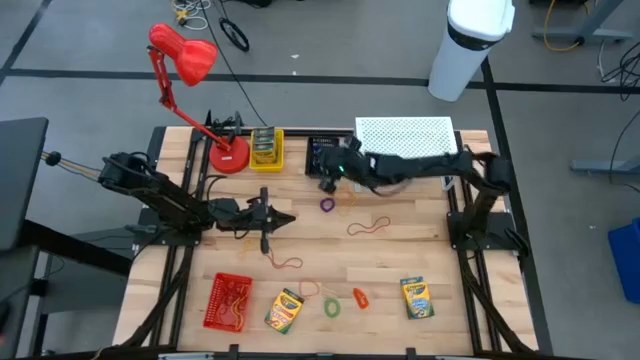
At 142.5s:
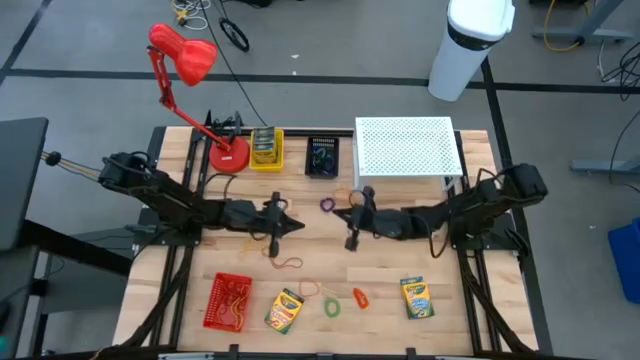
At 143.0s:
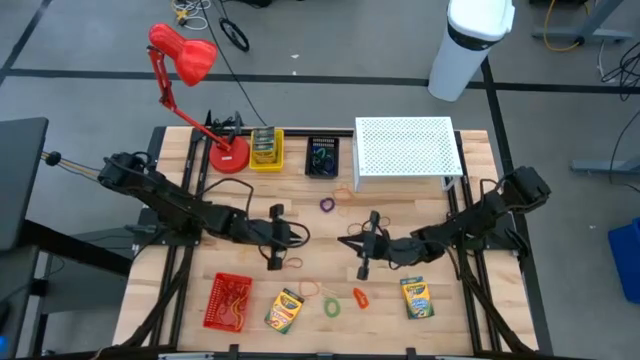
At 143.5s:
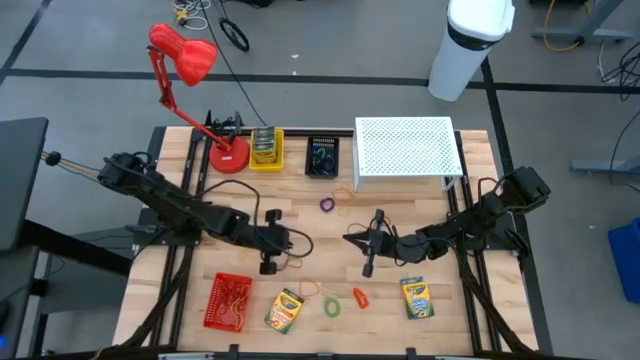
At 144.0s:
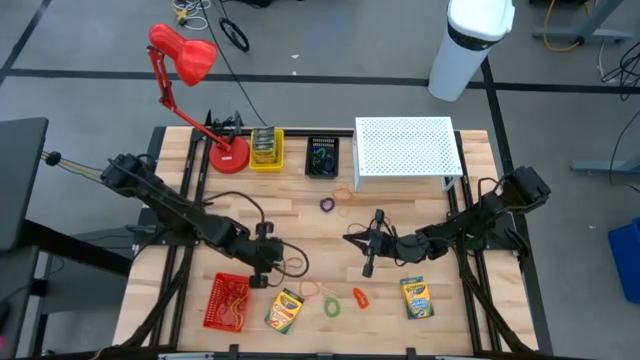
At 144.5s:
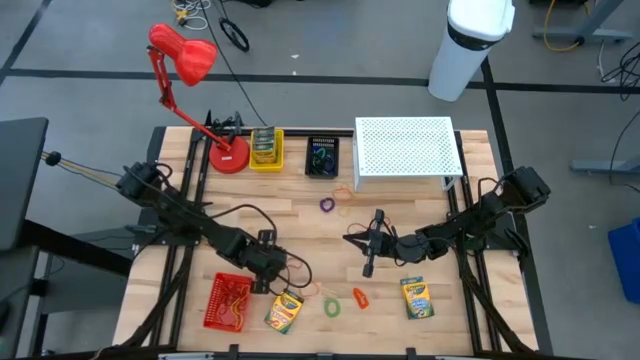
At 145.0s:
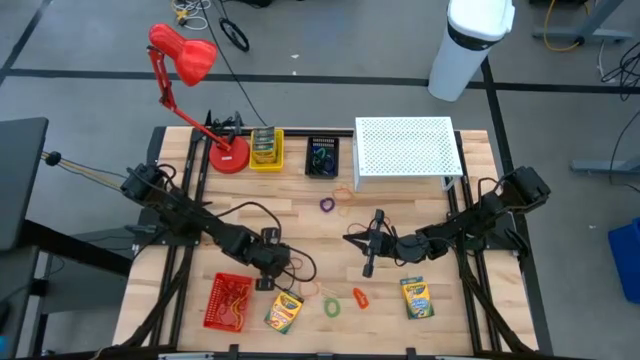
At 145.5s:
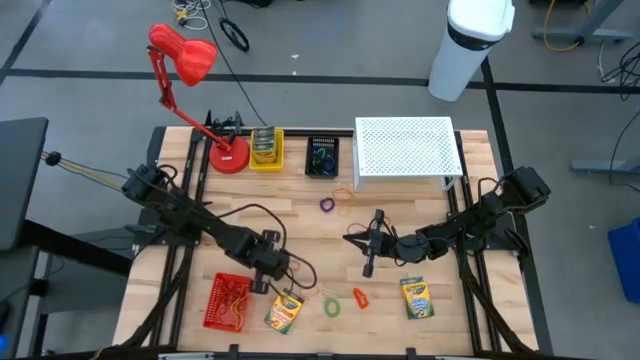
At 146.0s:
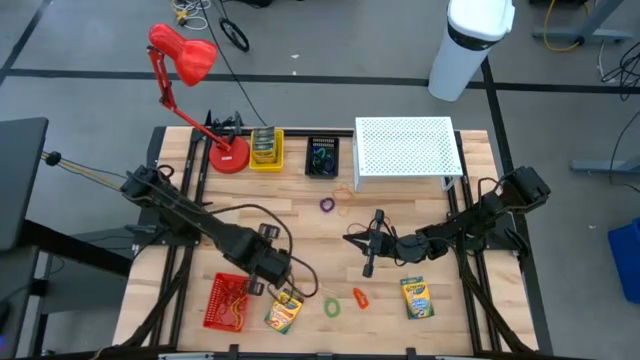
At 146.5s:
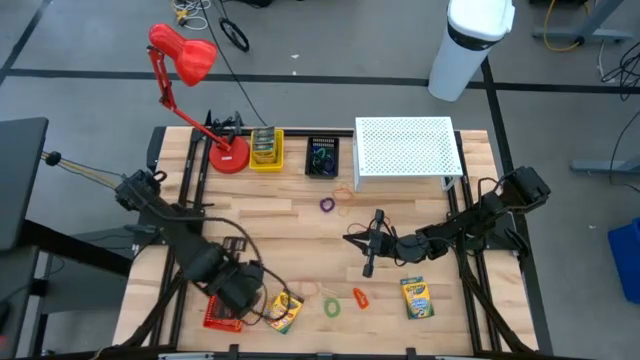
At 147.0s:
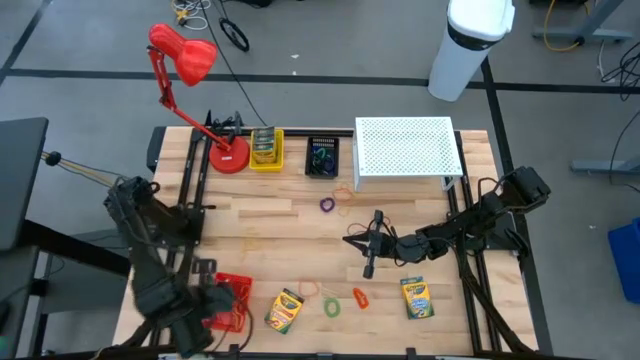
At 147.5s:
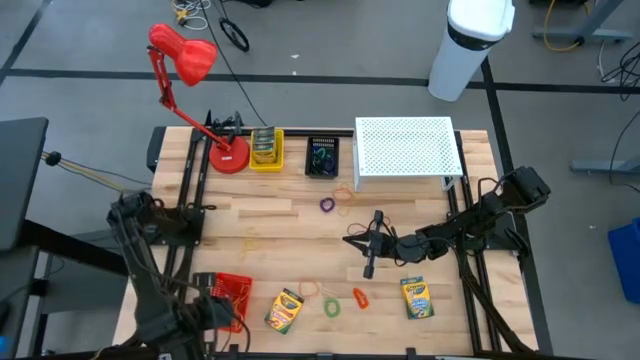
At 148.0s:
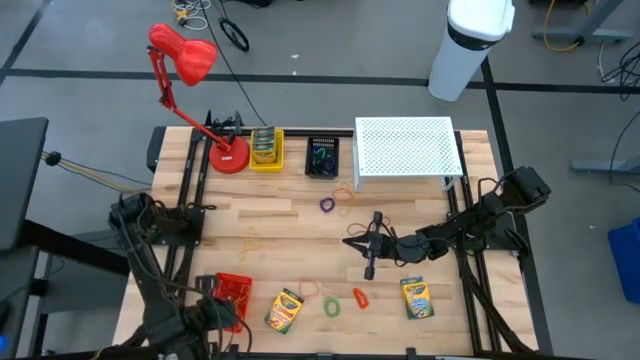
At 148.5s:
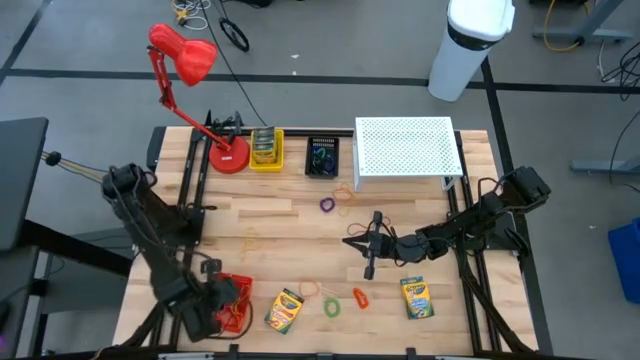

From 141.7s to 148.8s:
Task: Pick & Place Office Desk Supplies
Put the red rubber band into the red bin

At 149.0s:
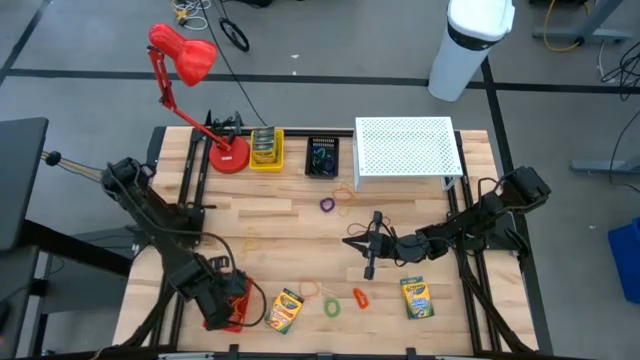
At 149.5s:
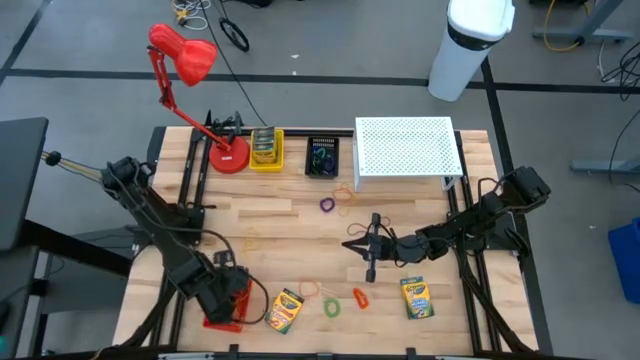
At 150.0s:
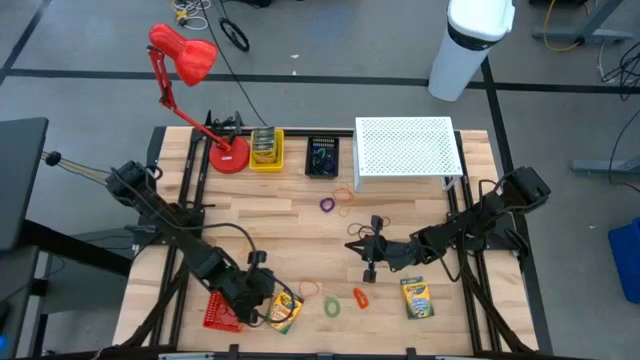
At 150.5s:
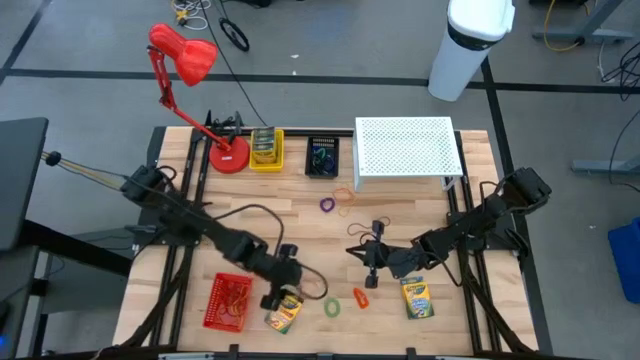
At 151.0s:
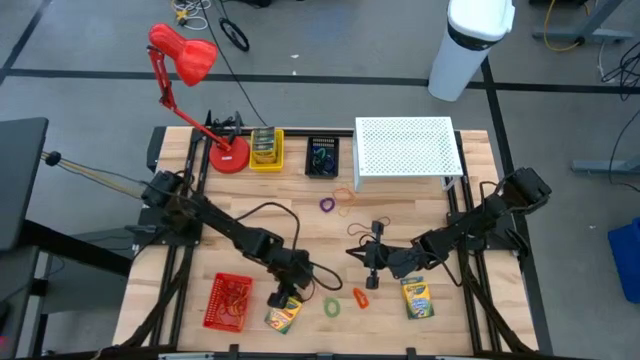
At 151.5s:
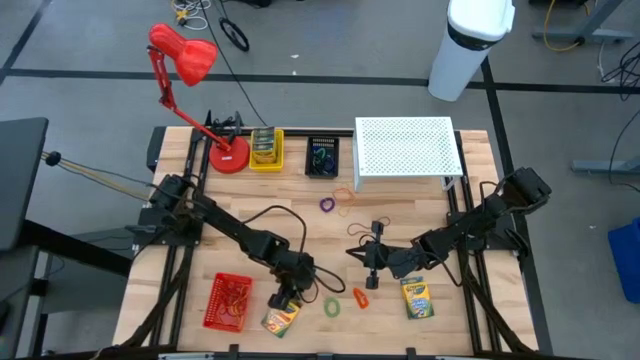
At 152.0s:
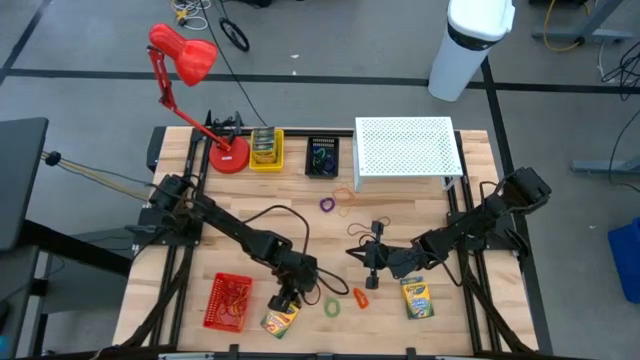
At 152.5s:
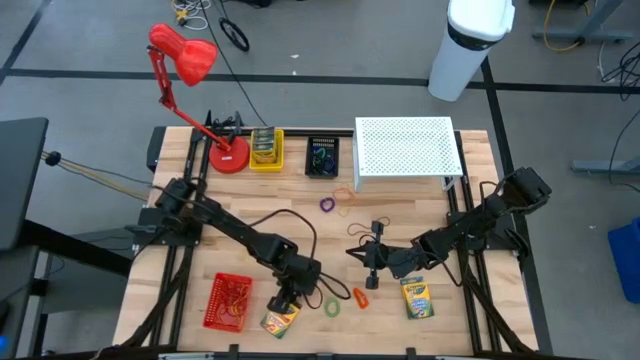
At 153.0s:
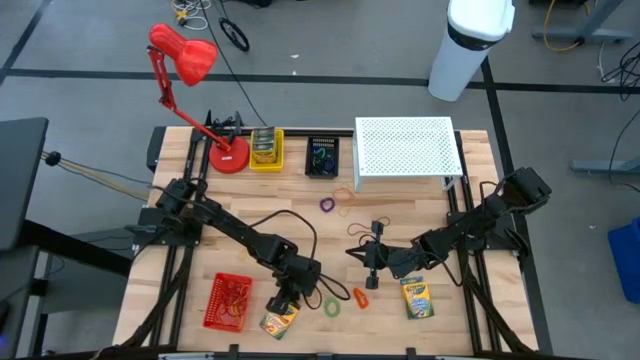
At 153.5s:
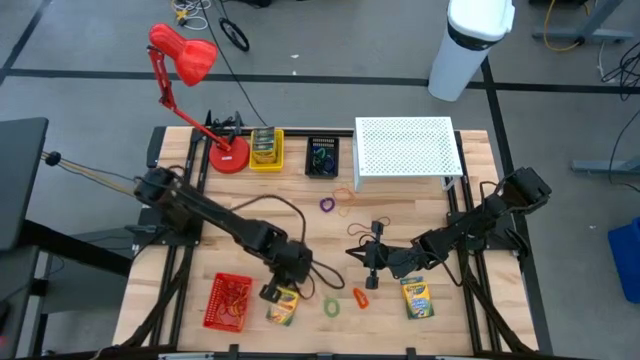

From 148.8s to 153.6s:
Put the left yellow crayon box into the yellow bin

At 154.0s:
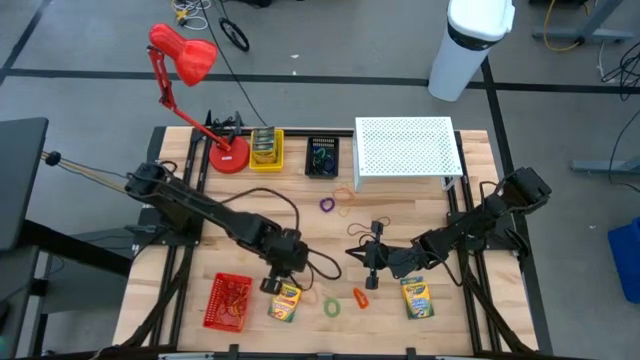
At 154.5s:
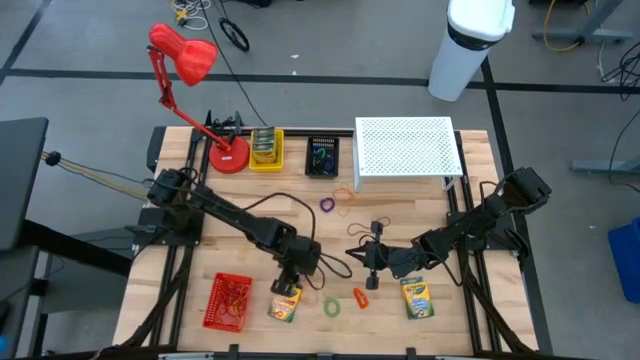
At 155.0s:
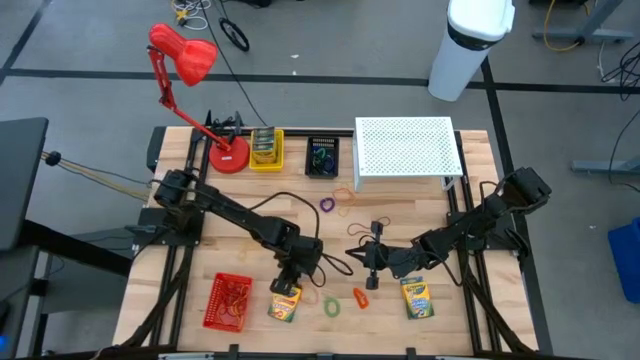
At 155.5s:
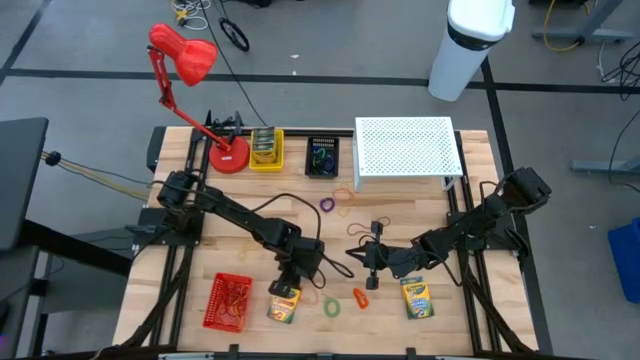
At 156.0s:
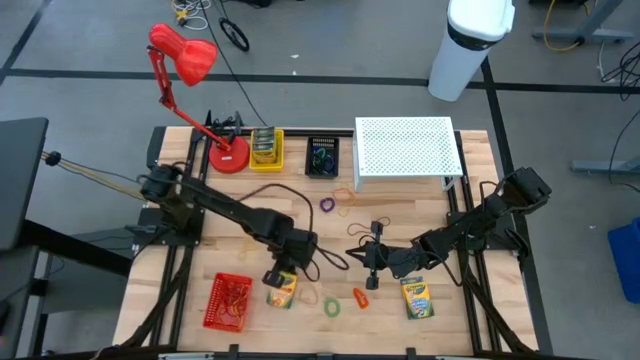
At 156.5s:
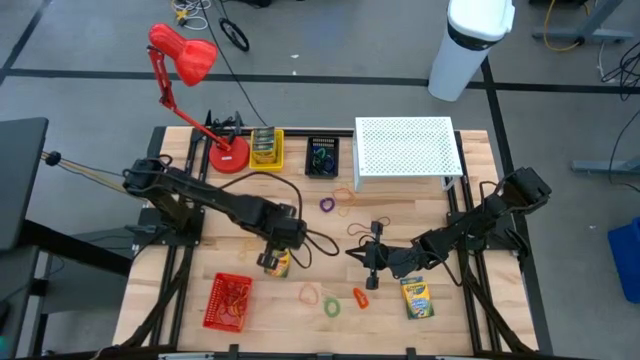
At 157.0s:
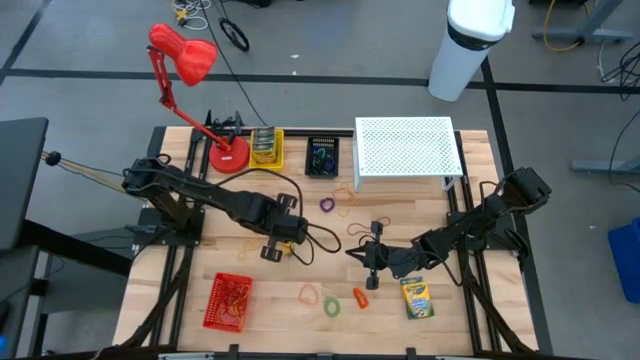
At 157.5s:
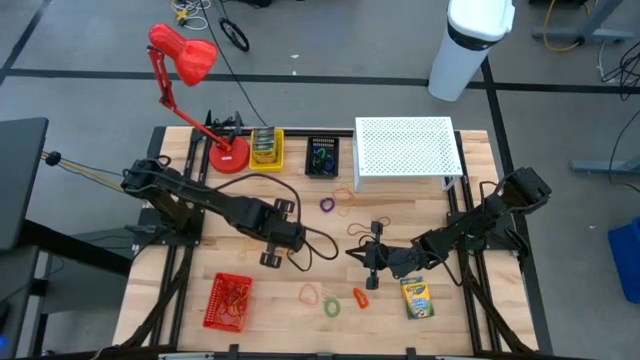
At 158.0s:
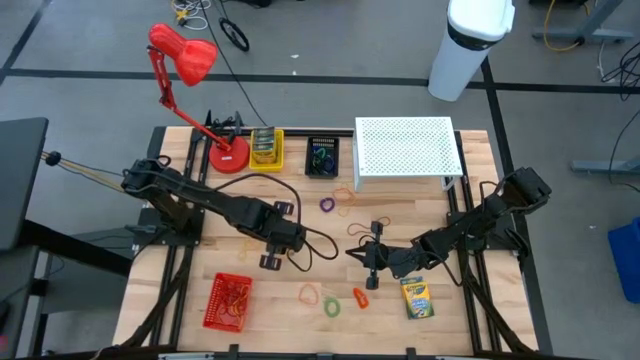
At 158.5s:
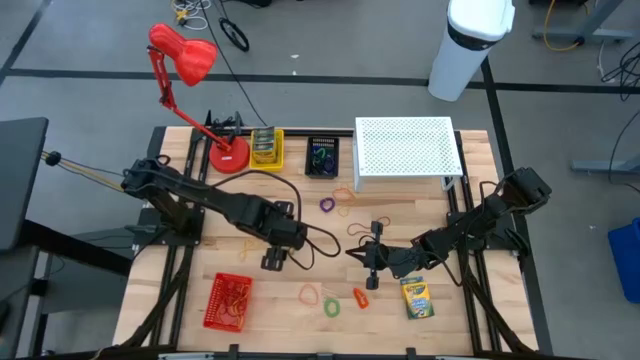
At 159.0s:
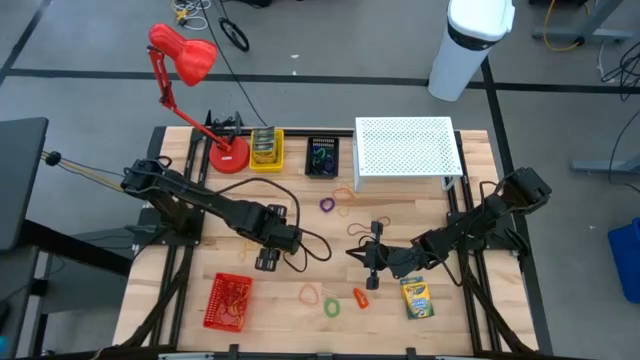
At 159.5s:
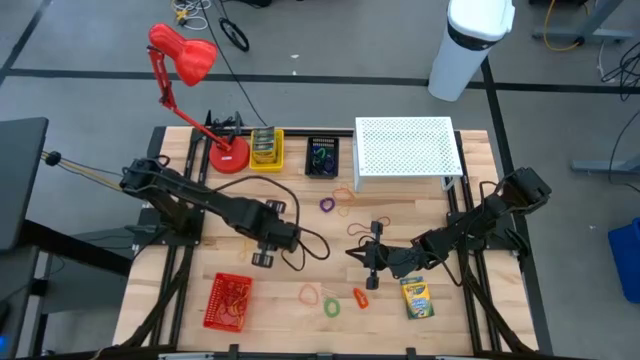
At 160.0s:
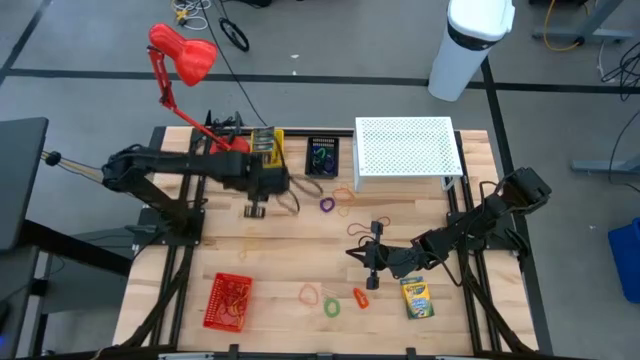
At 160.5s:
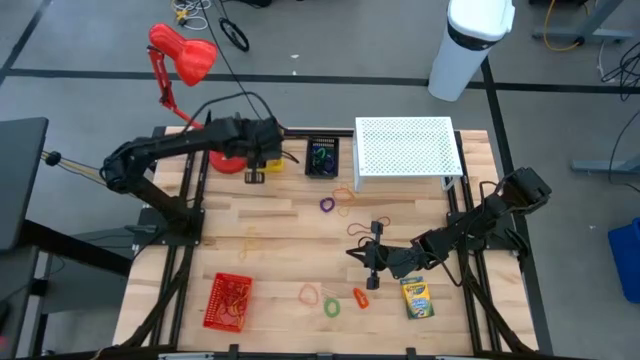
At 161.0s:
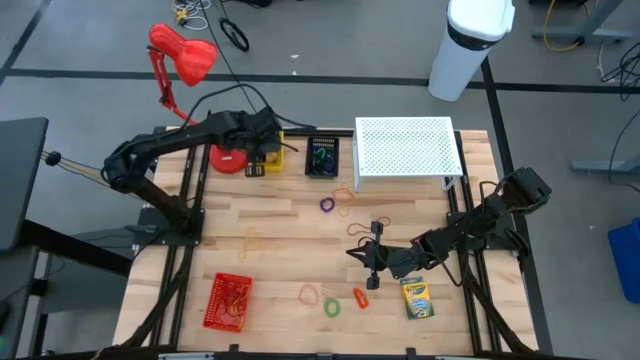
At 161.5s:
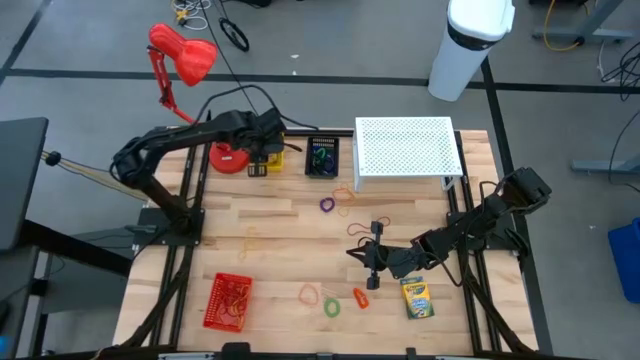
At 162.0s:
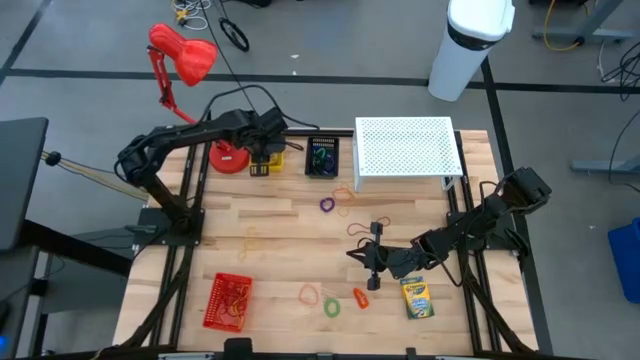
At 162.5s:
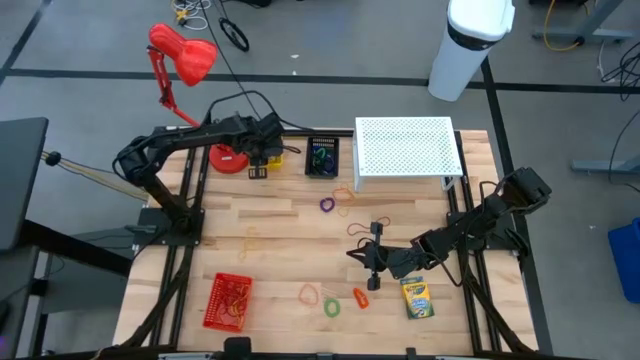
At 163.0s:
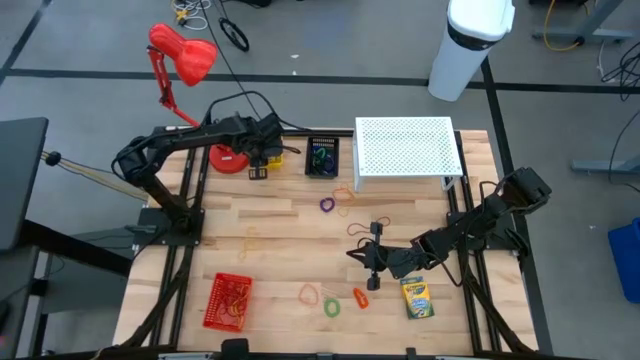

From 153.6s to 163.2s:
Put the left yellow crayon box into the yellow bin
